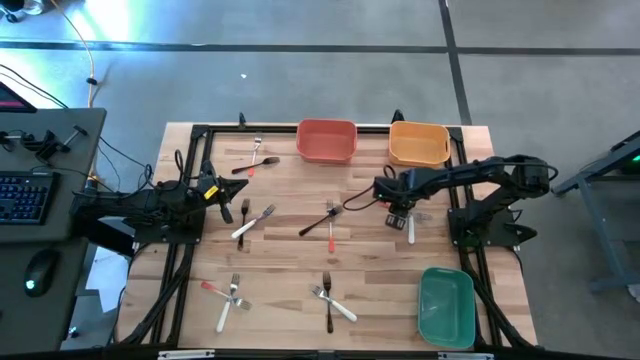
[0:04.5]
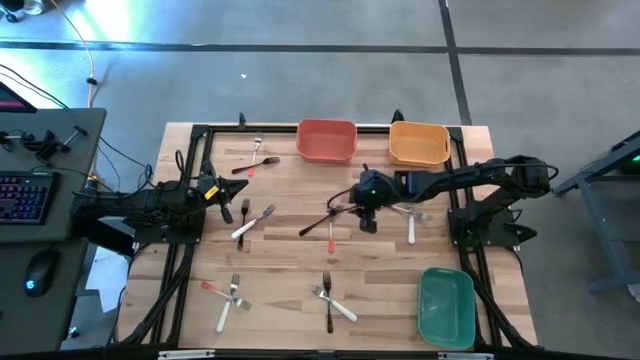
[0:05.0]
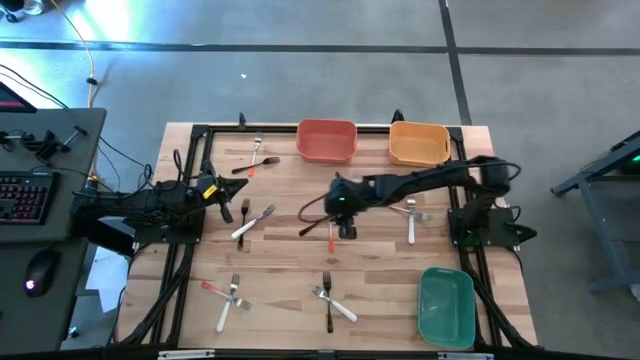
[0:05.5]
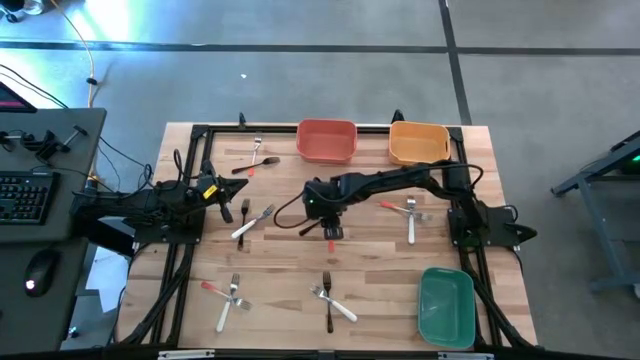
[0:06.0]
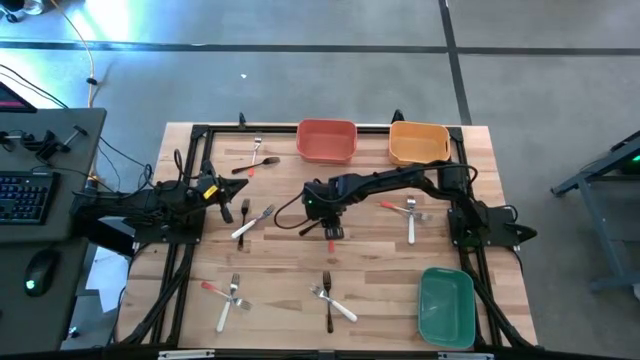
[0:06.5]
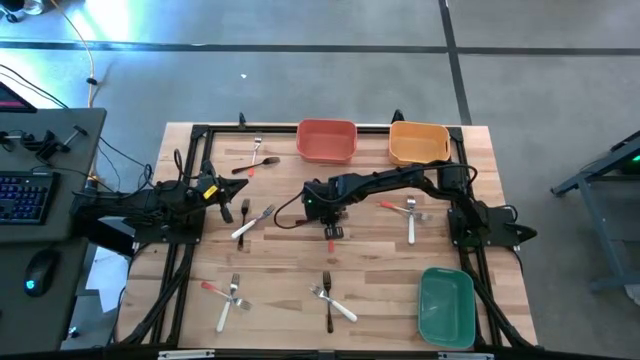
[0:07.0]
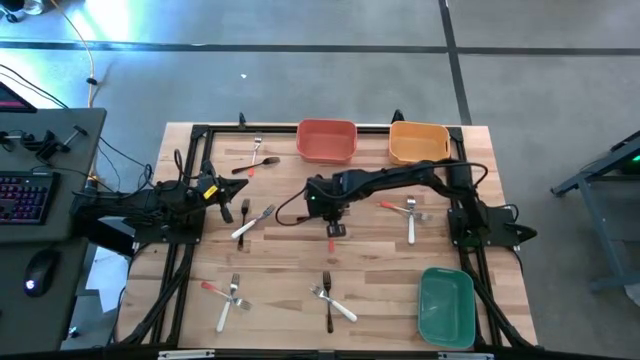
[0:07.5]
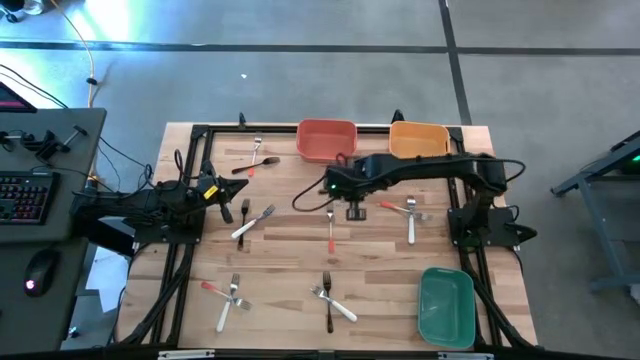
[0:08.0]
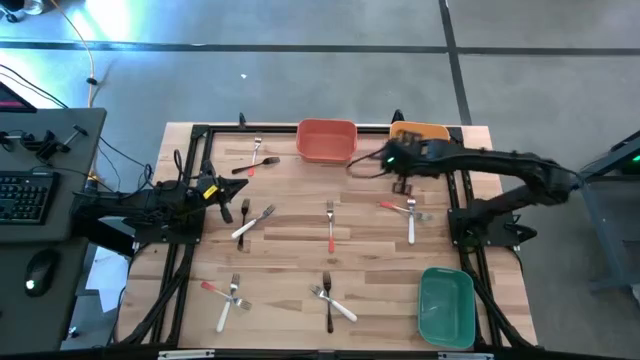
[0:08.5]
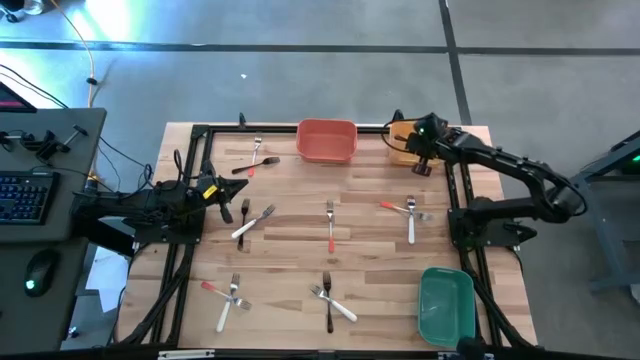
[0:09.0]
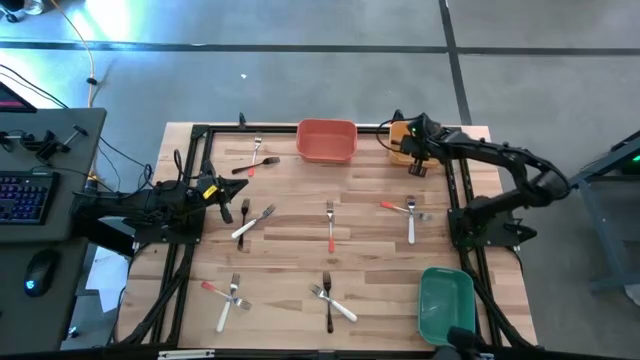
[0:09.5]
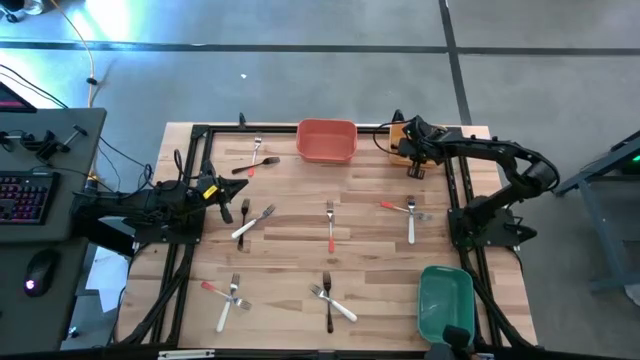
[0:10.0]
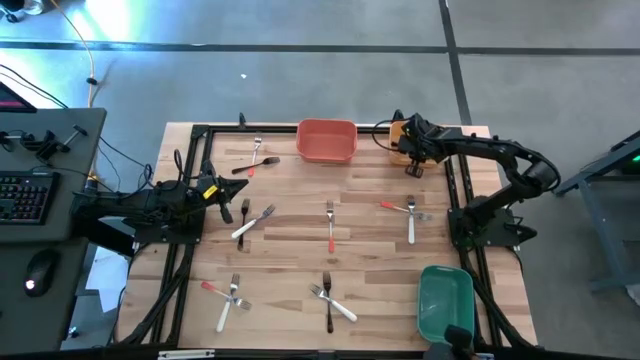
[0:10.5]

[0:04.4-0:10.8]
Task: Sort silverware by color (type)
Put the black fork into the yellow bin

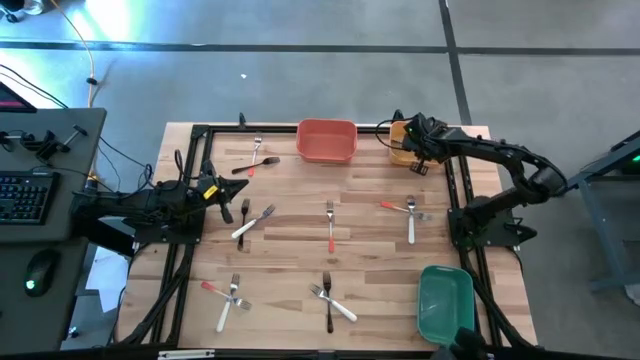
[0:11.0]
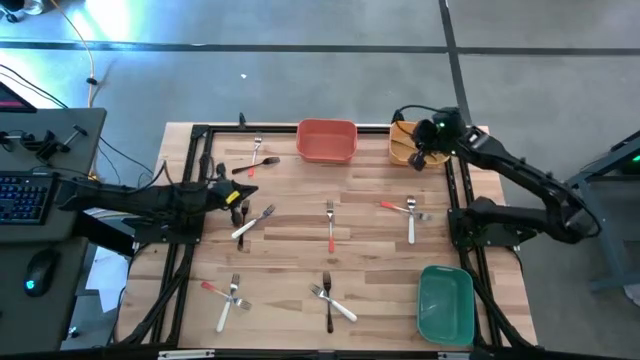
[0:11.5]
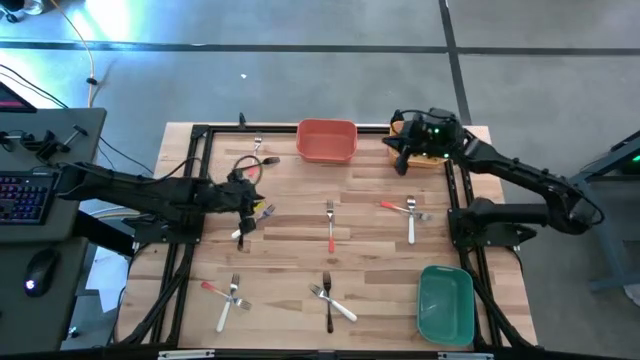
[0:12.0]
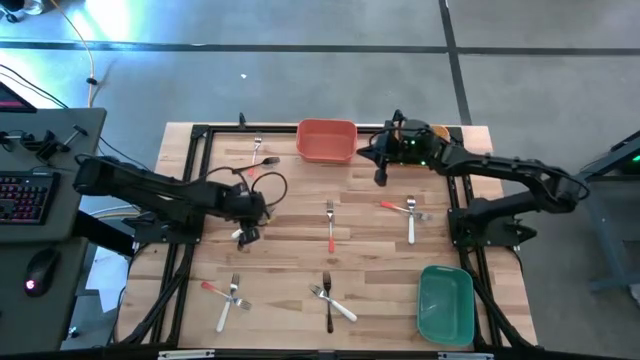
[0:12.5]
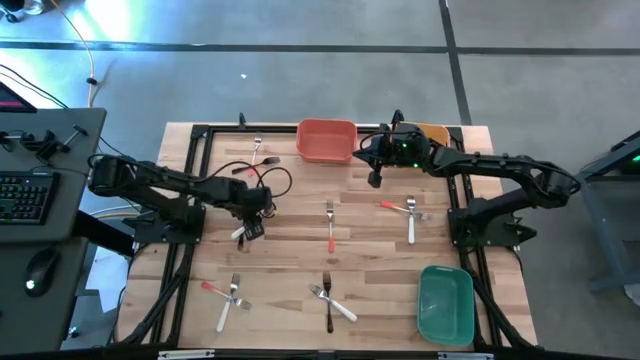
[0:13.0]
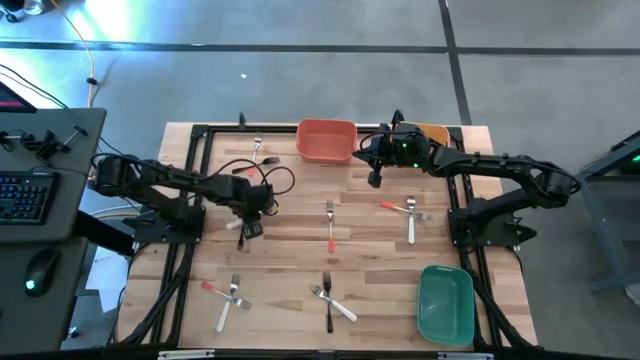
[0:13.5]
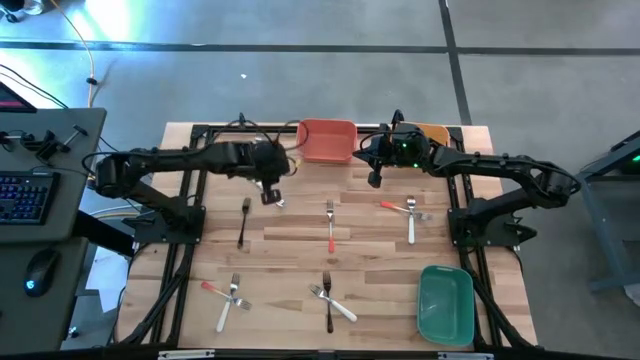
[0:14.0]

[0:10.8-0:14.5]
Put the white fork into the orange bin

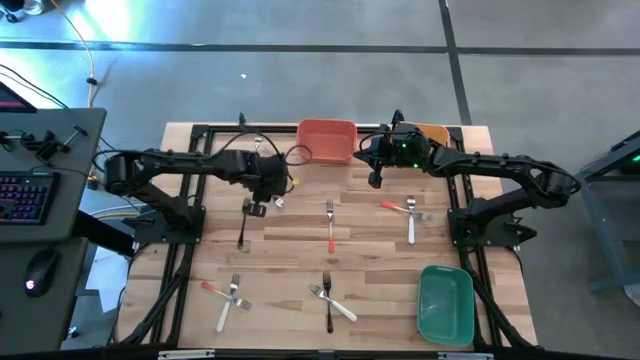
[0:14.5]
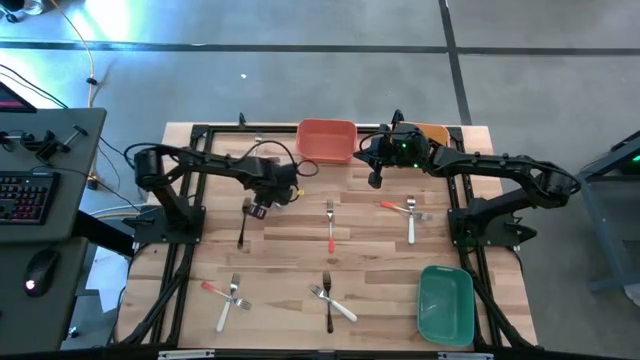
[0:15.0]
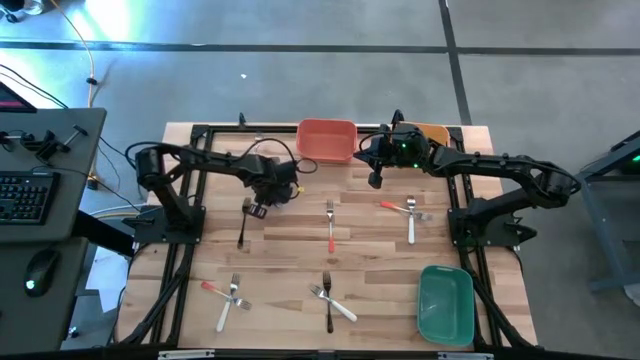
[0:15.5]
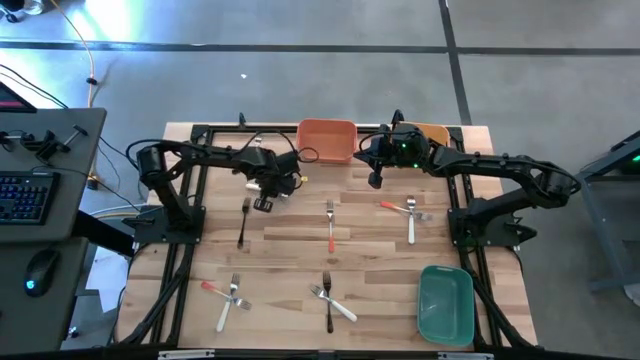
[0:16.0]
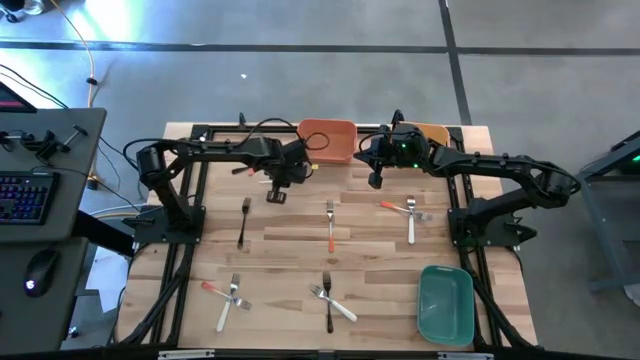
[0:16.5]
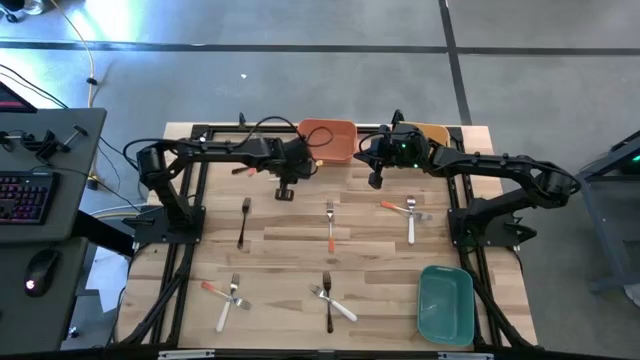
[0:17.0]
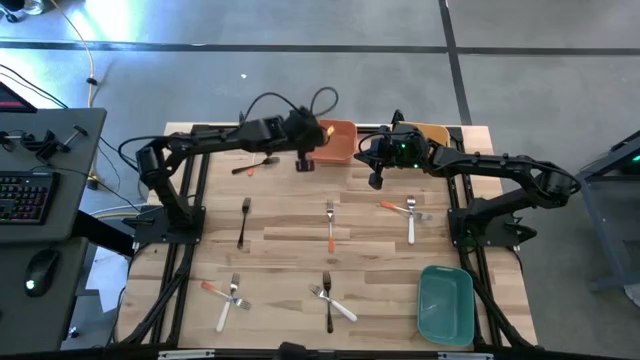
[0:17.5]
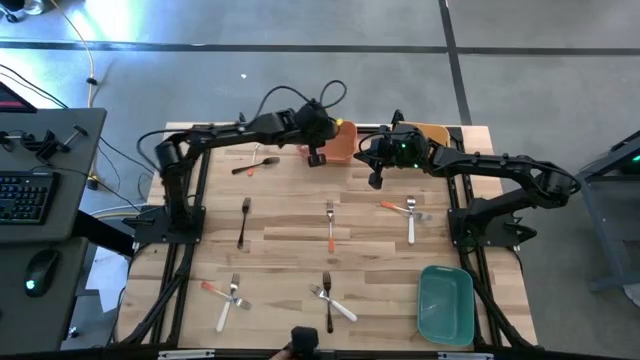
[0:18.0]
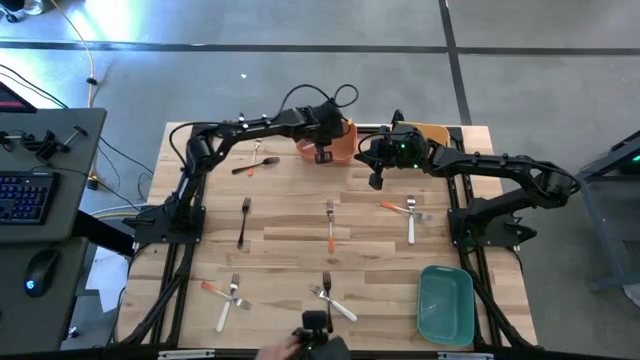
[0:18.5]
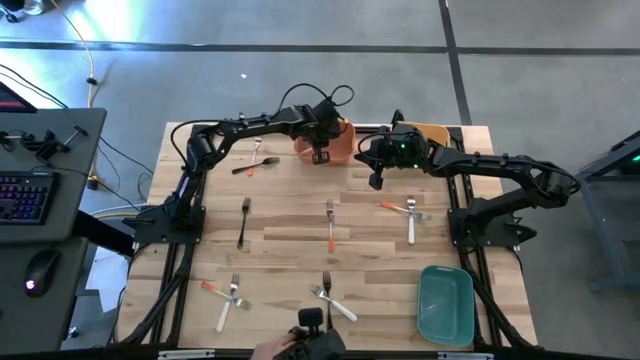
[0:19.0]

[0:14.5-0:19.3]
Put the white fork into the orange bin

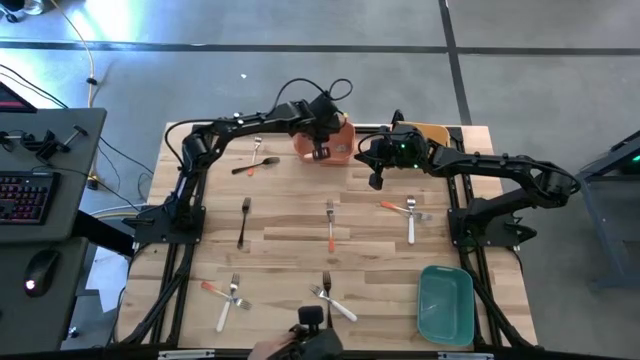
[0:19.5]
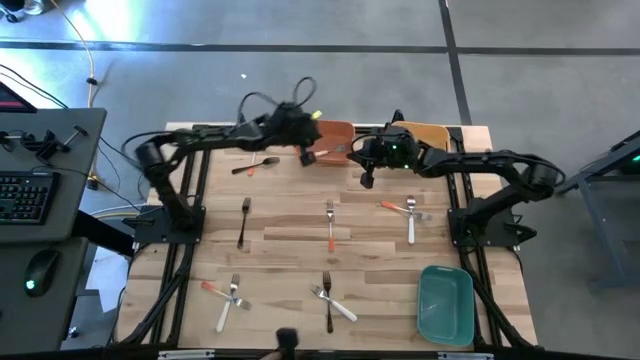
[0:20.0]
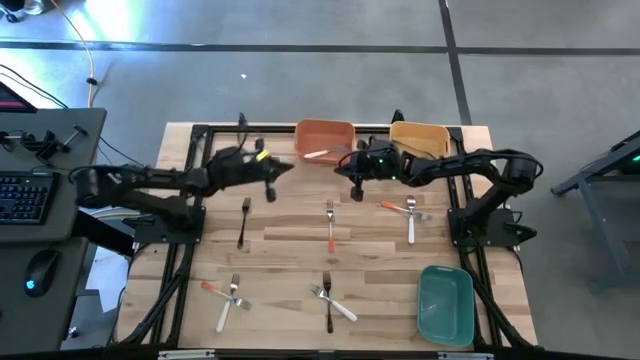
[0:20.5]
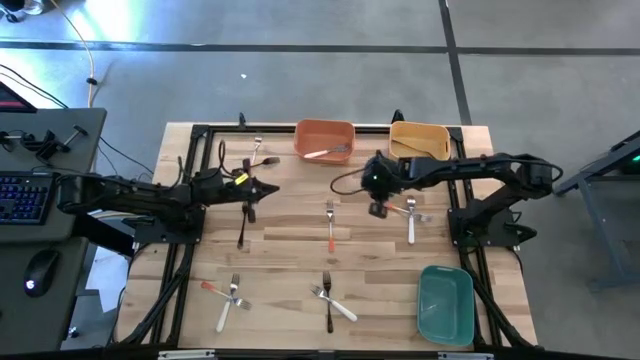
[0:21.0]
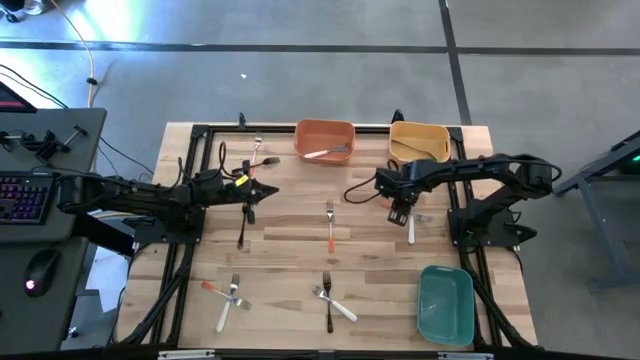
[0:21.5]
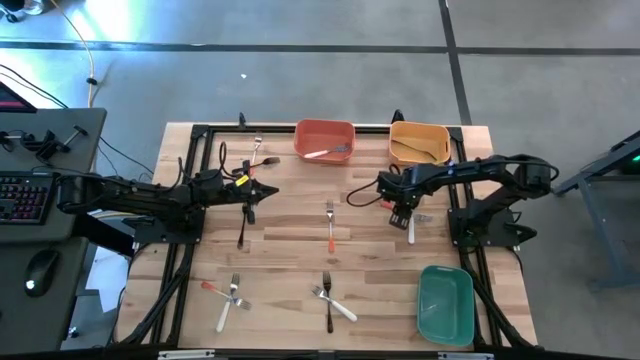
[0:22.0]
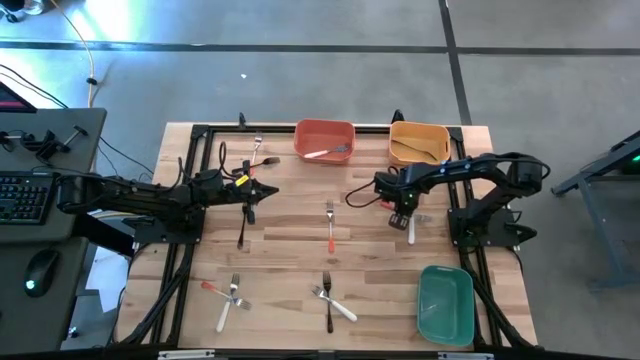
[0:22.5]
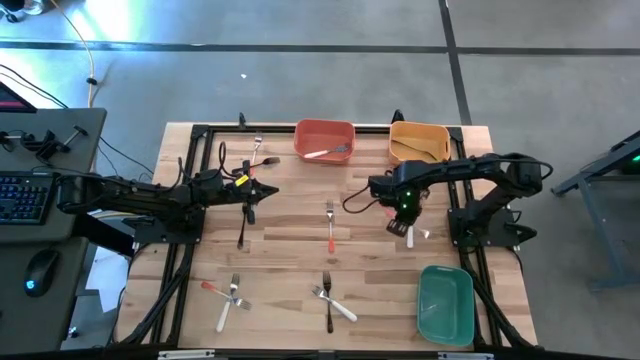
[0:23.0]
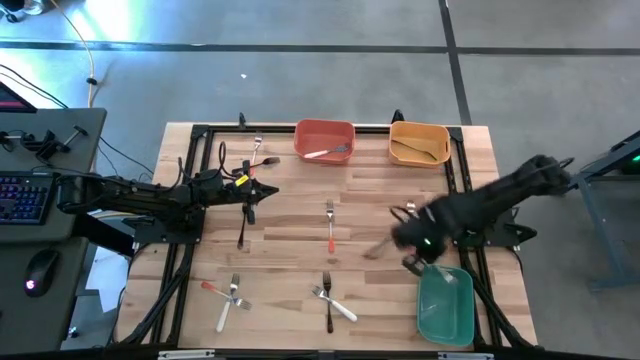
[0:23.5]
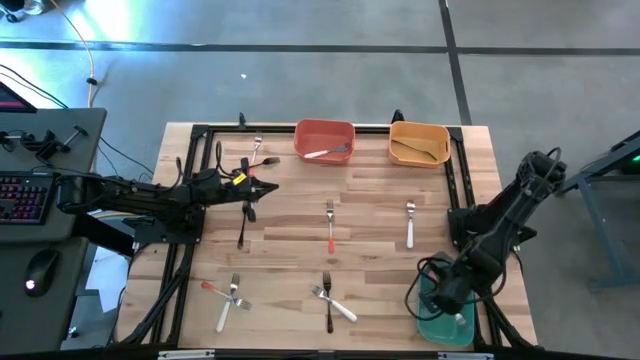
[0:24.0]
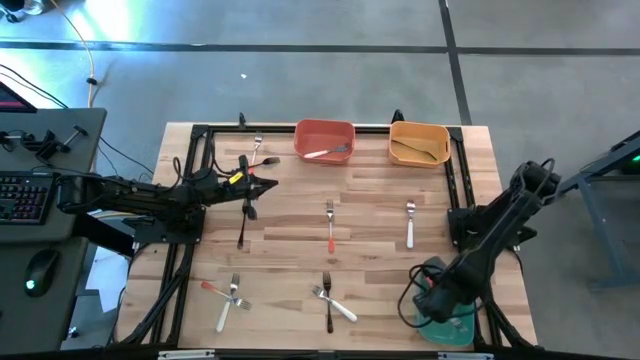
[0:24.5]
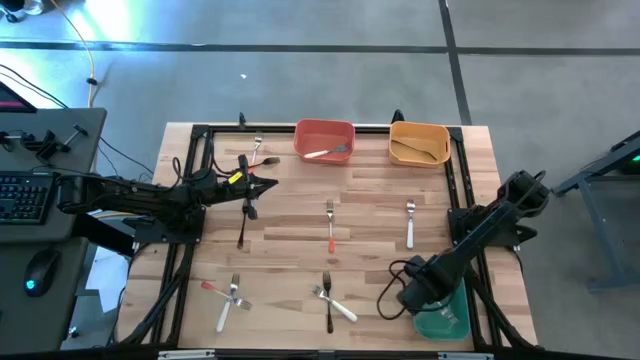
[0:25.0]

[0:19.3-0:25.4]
Put the orange fork into the green bin
